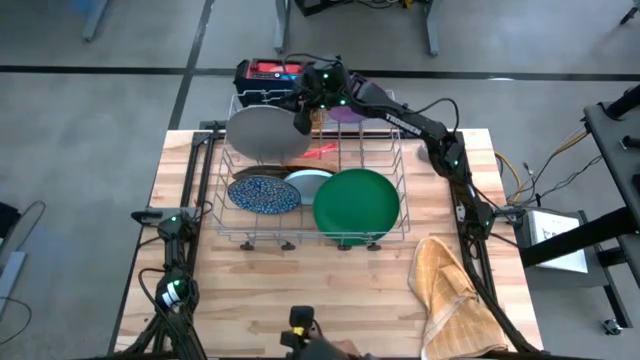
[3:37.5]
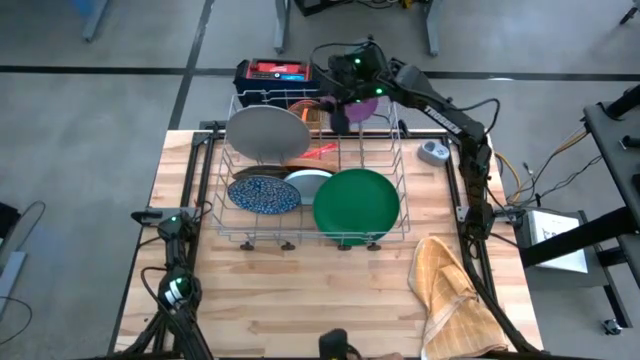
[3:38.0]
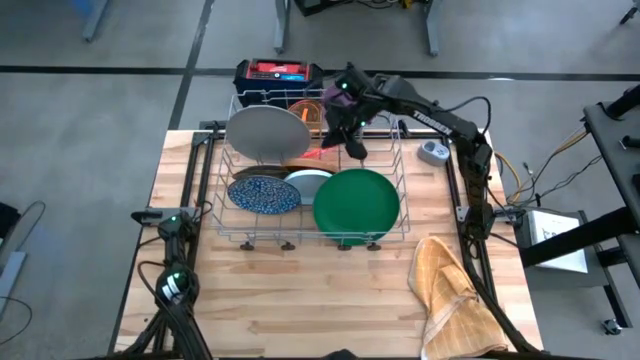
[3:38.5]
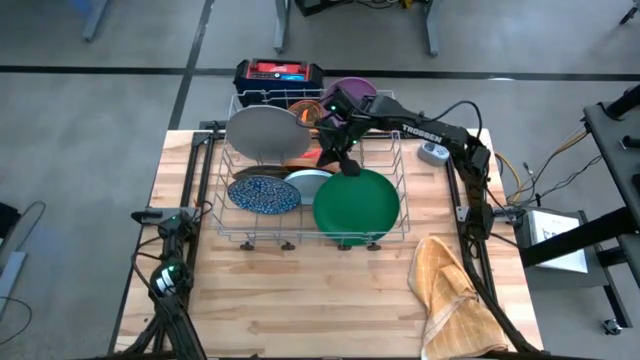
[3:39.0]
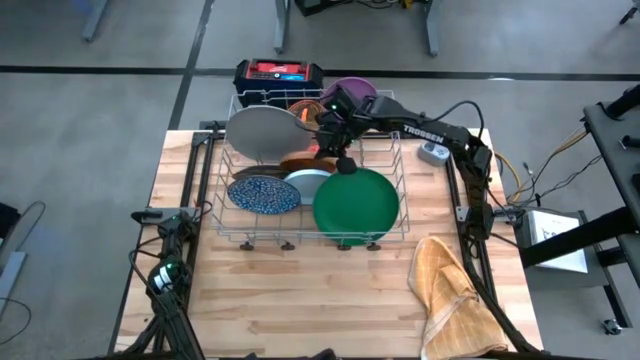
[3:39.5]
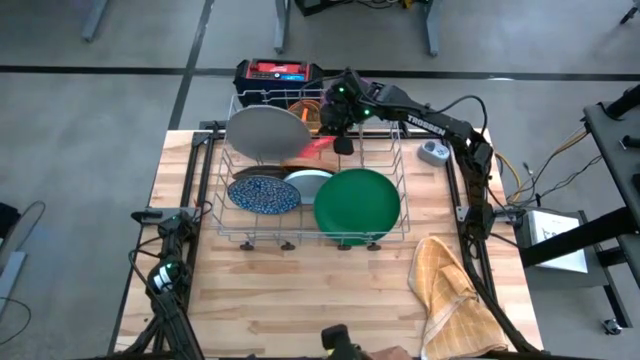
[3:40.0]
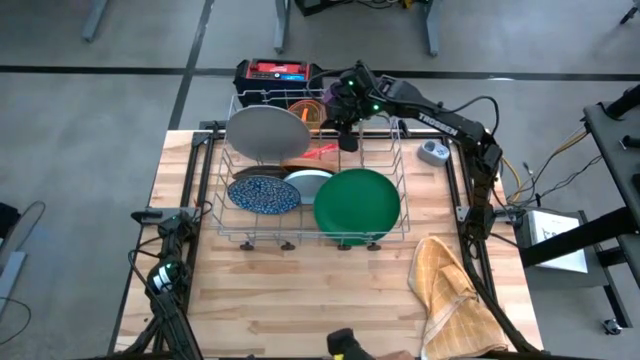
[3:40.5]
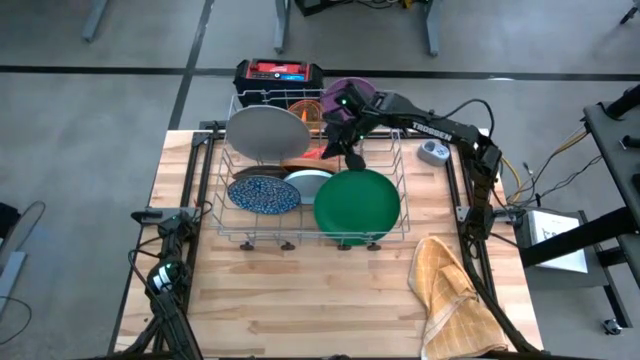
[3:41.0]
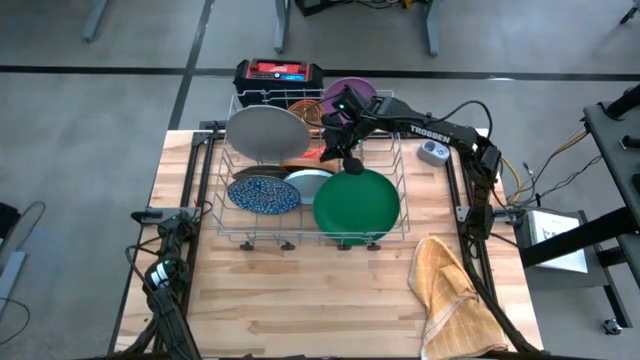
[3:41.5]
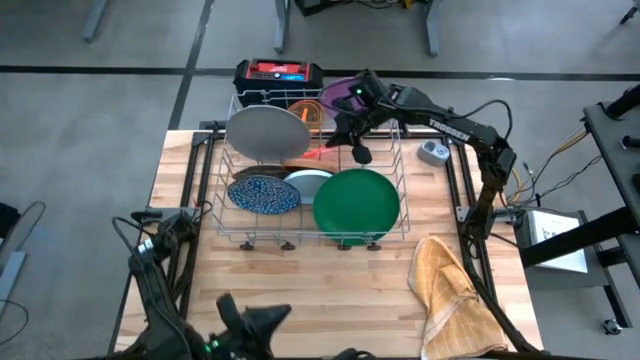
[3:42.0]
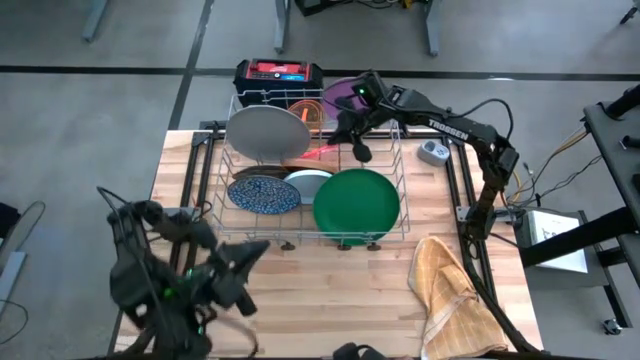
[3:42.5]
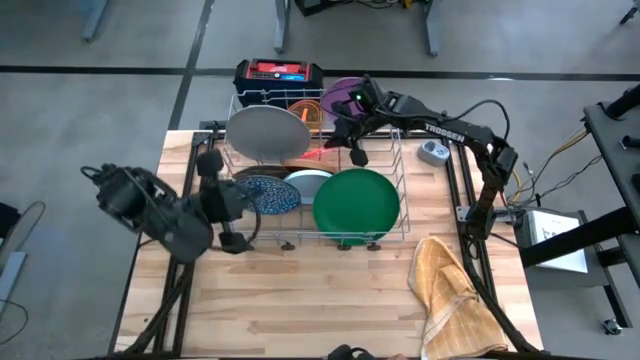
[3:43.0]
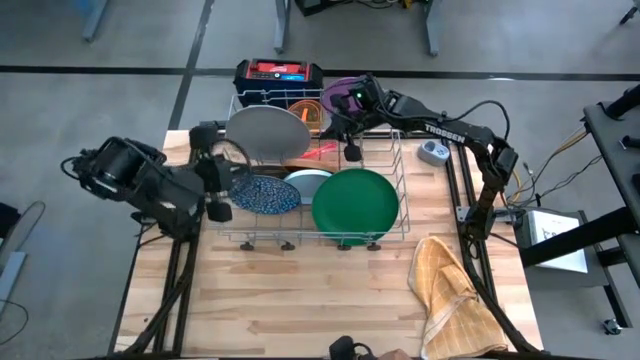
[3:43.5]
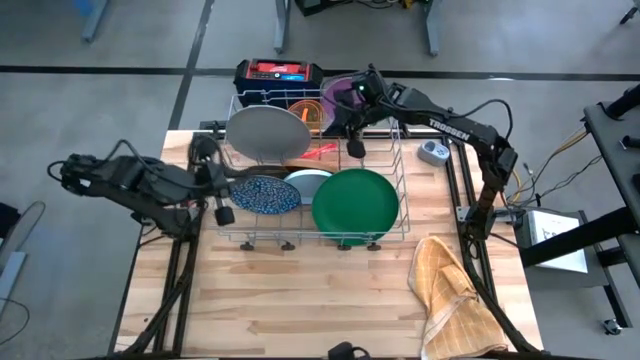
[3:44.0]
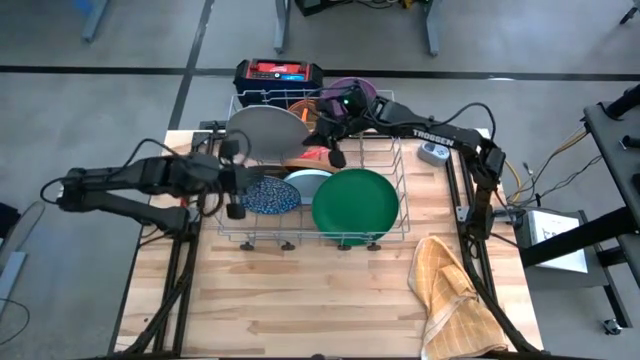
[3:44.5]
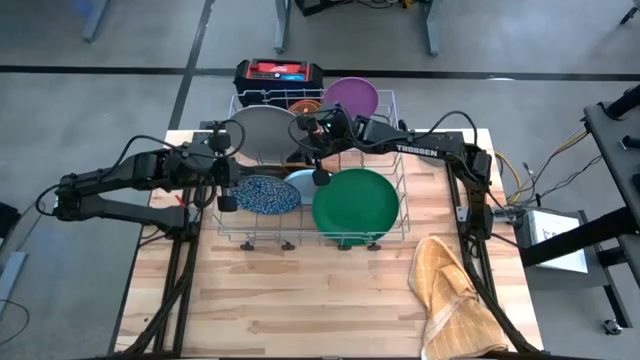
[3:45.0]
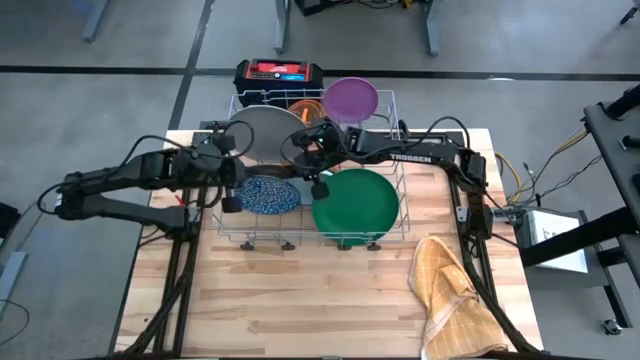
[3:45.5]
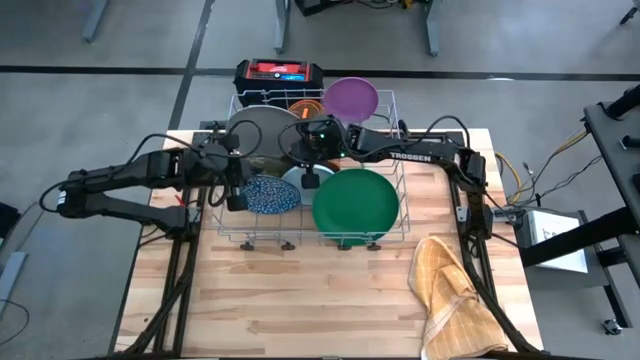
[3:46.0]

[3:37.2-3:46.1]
Task: Sort dishes
Adjust the plates in the dish rack

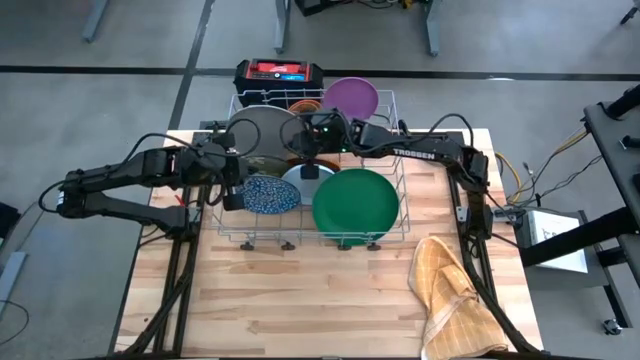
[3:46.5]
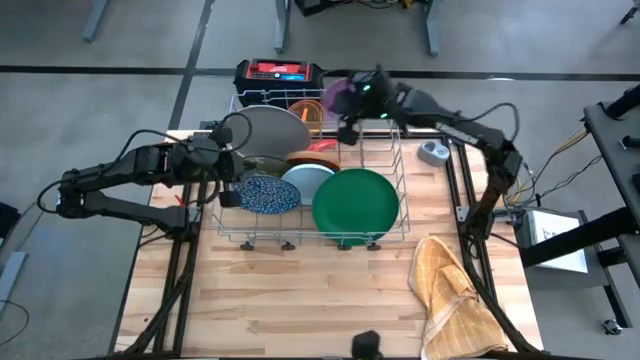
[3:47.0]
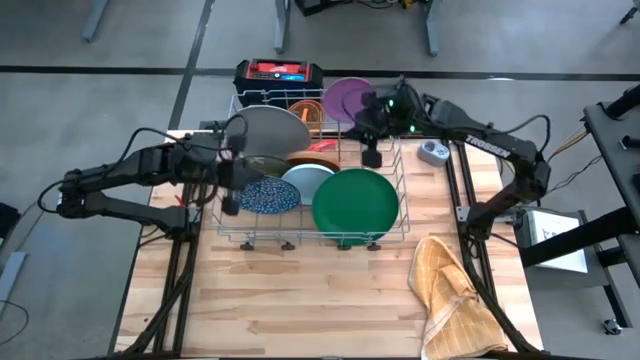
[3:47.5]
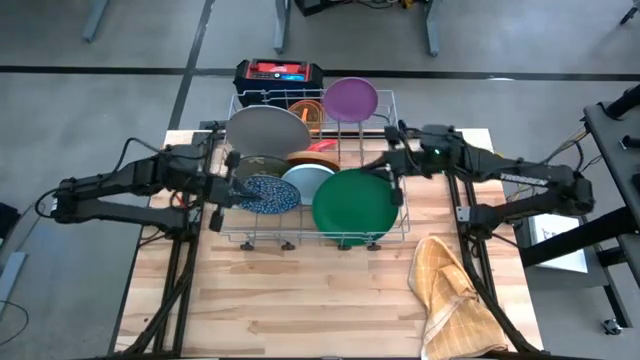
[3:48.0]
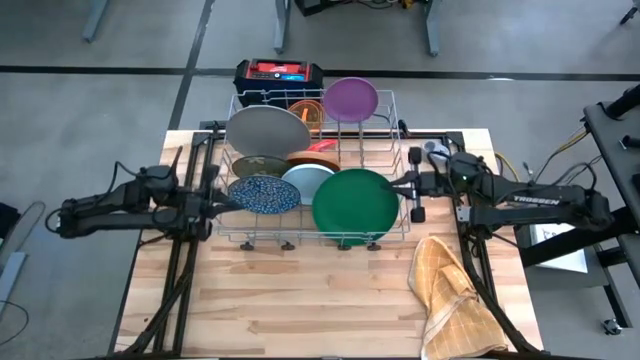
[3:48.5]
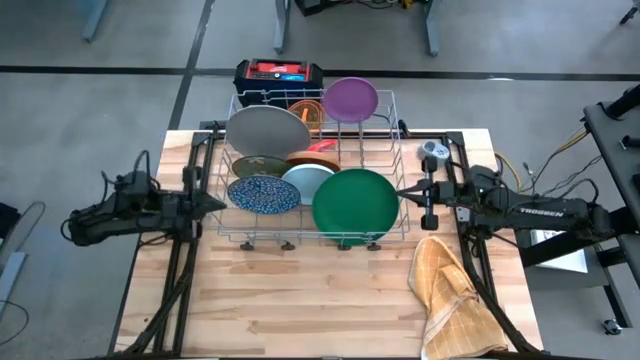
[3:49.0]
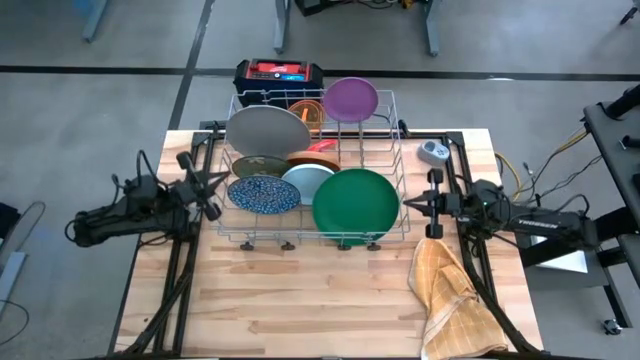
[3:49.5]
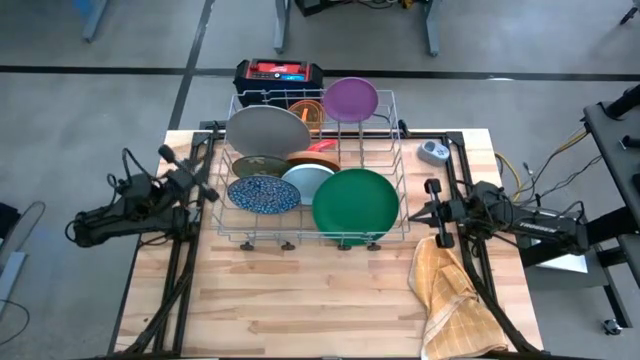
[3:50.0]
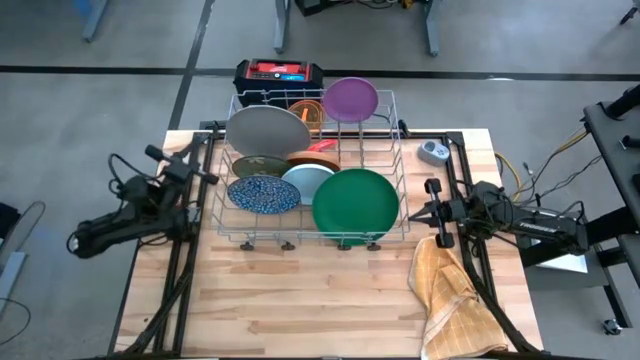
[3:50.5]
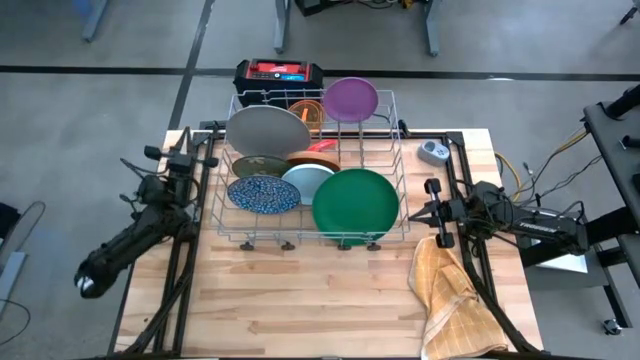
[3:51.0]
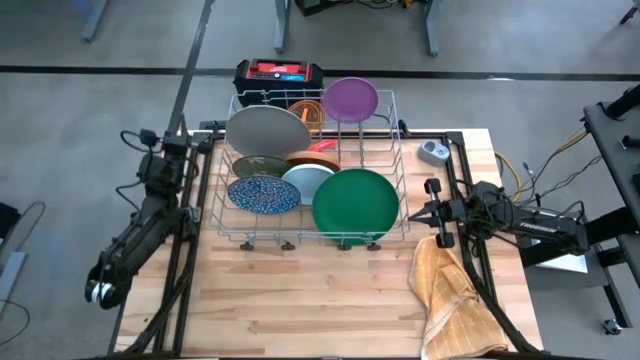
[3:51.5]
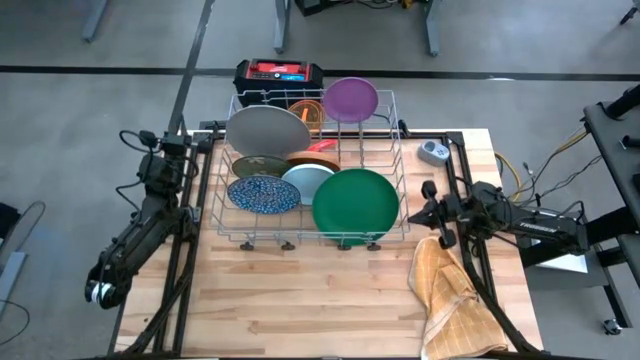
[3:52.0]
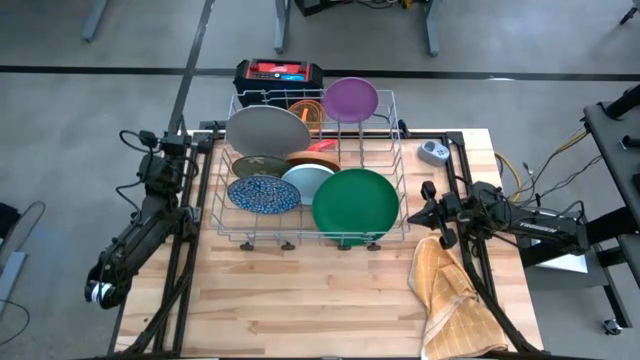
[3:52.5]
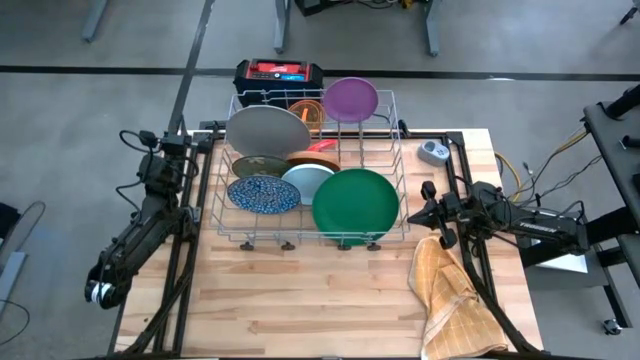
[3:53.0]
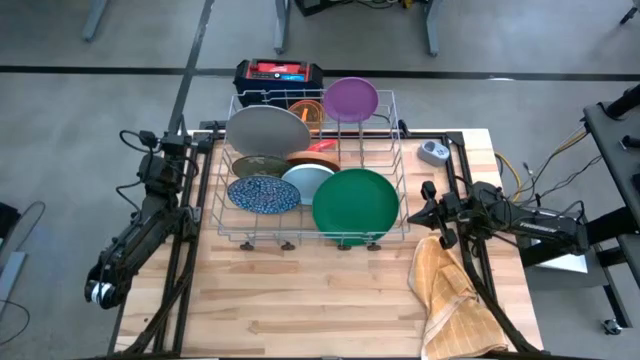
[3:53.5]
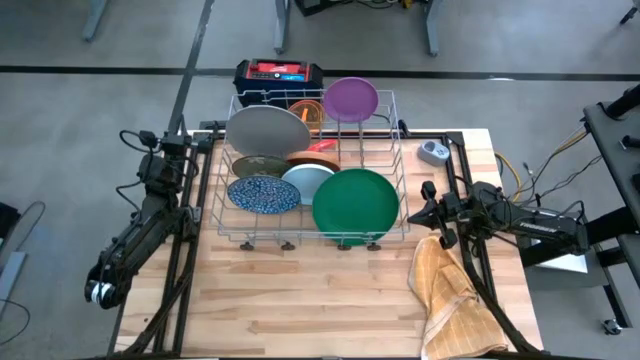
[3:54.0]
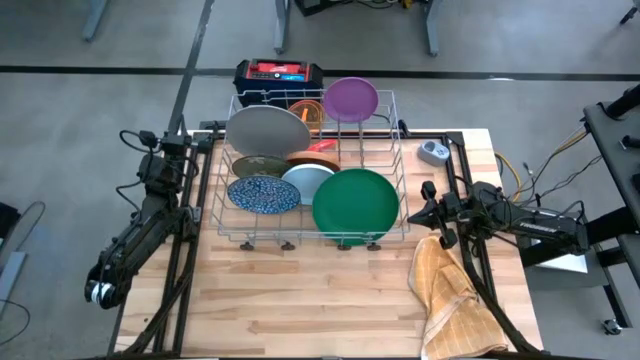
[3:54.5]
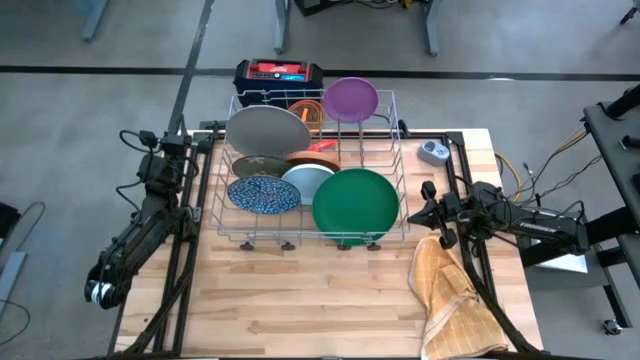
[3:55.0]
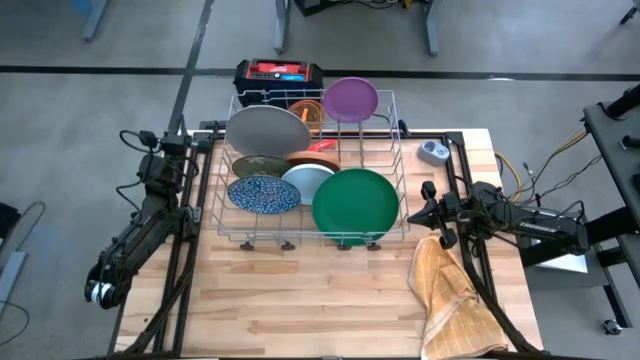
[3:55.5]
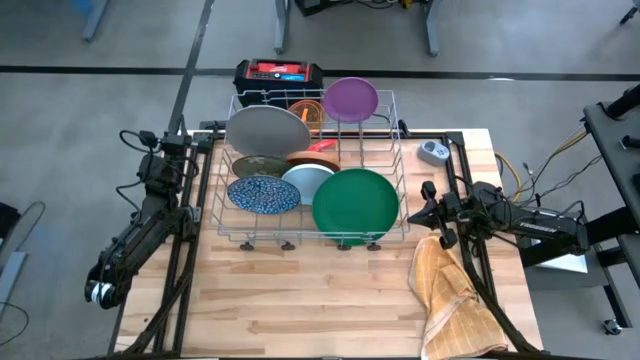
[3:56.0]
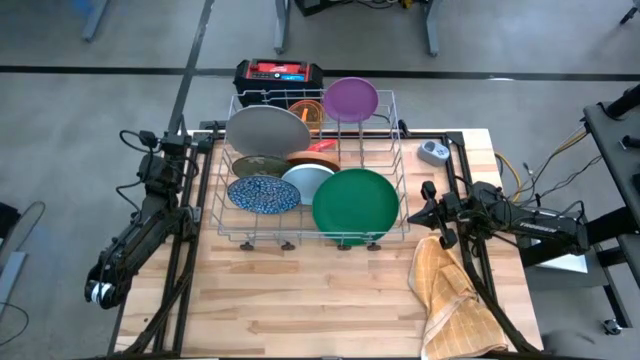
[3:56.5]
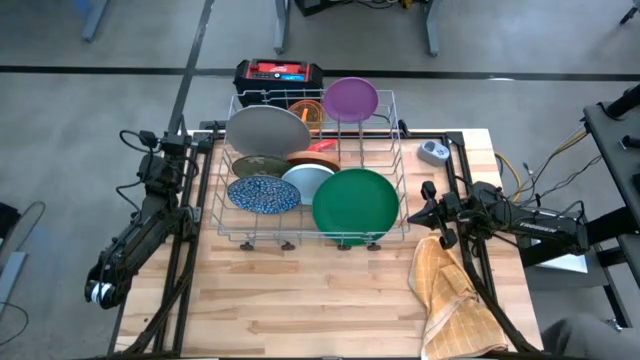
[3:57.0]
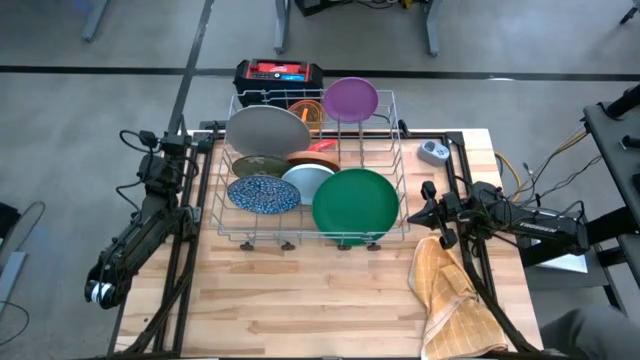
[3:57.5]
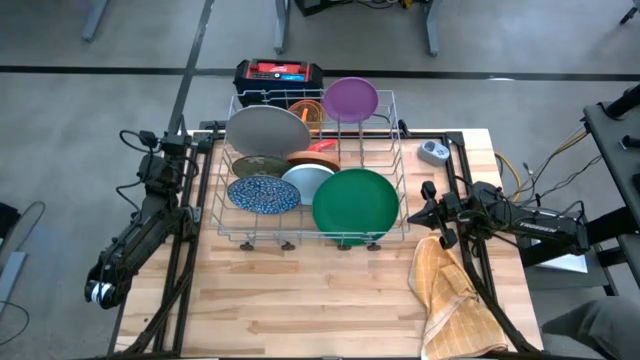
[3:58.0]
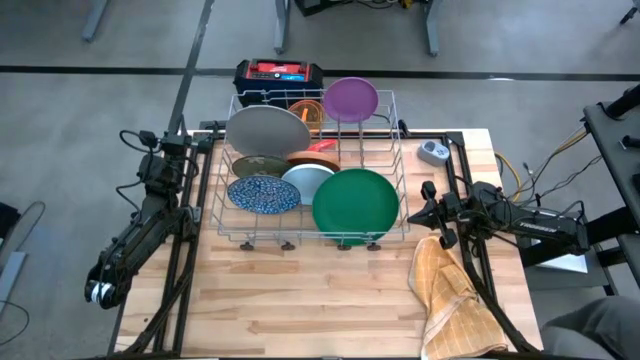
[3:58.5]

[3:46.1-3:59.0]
Return to Home Position
